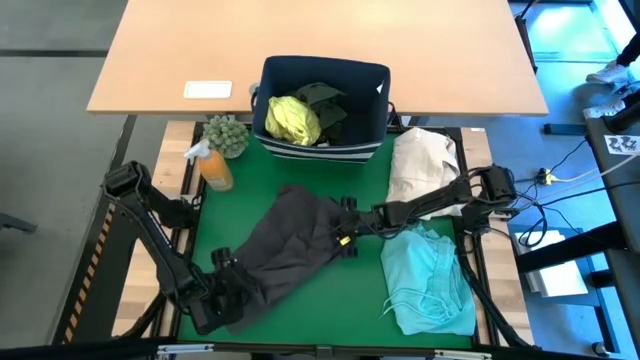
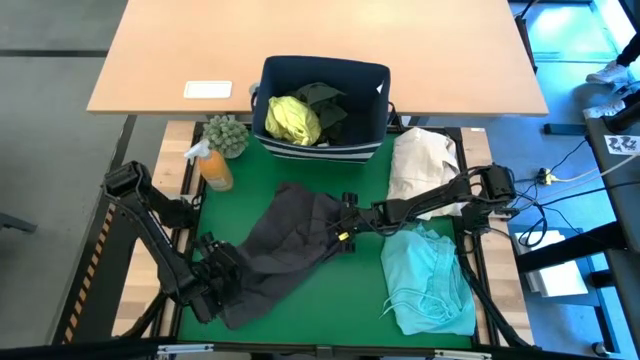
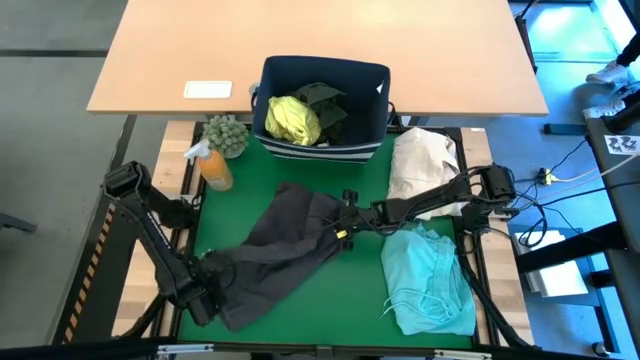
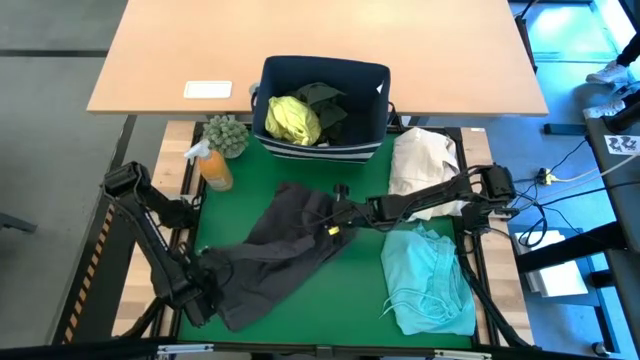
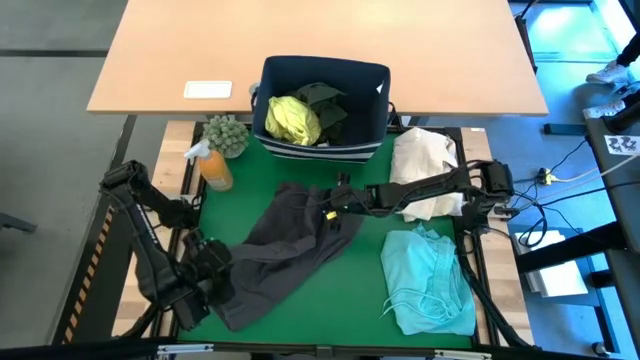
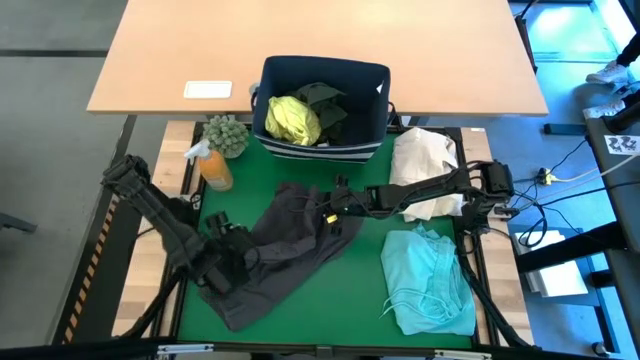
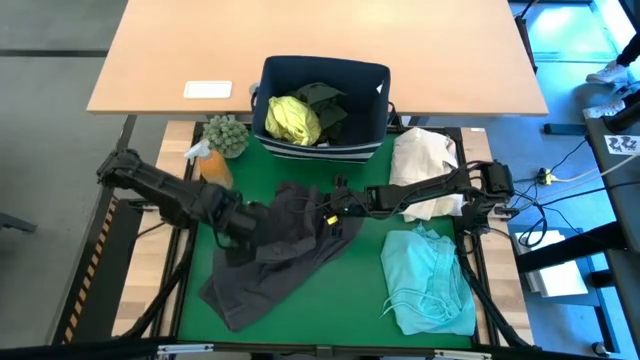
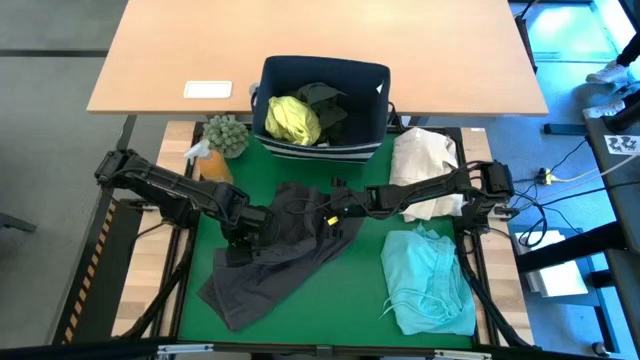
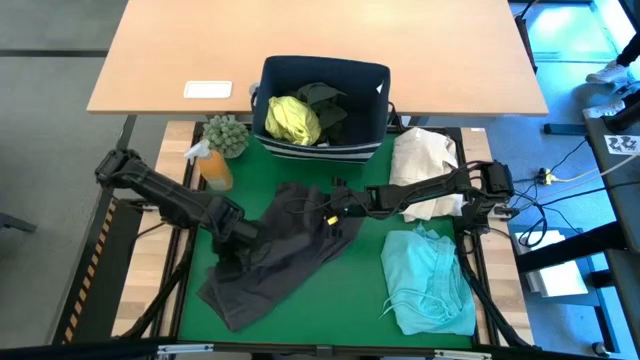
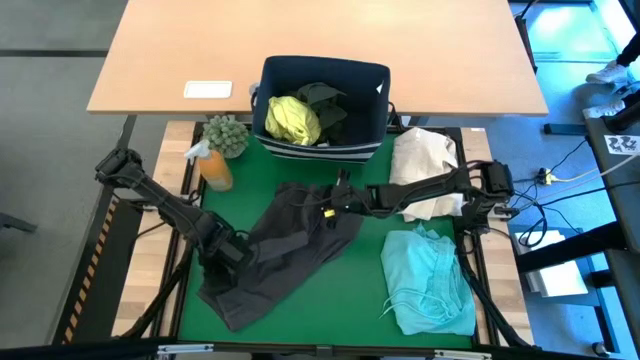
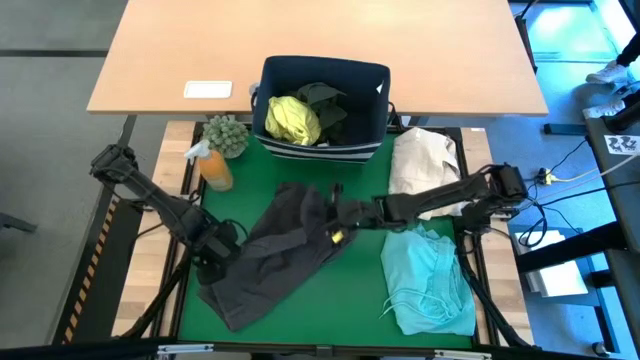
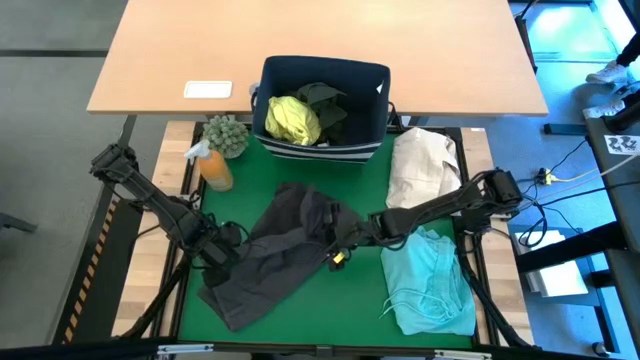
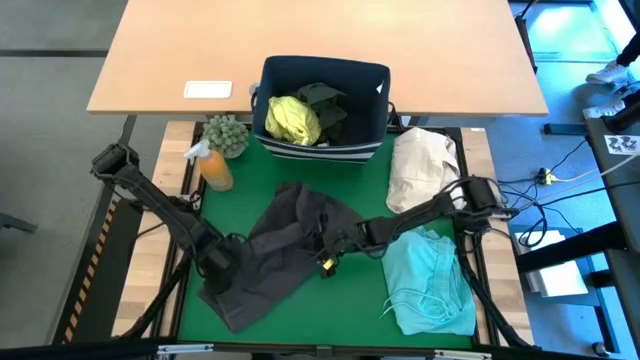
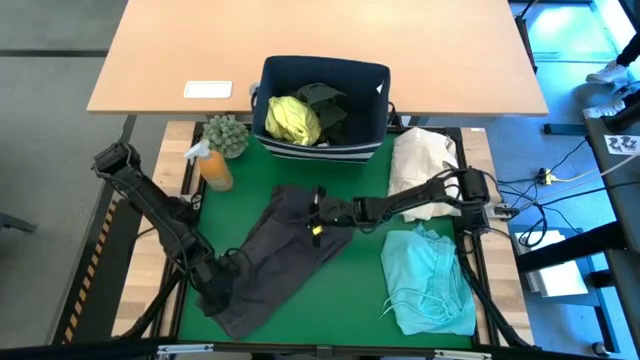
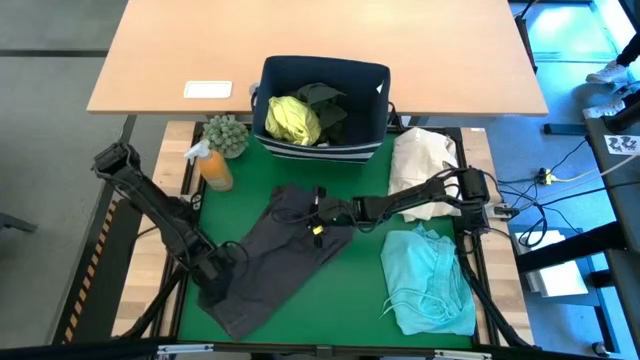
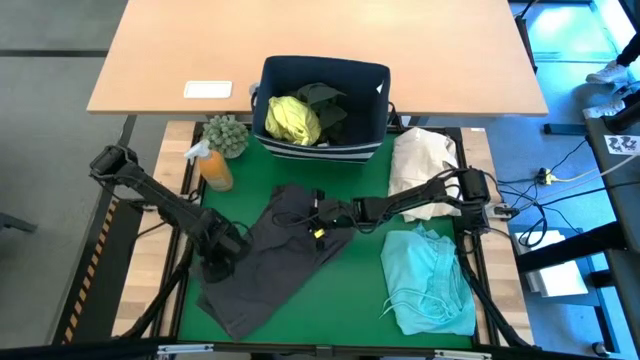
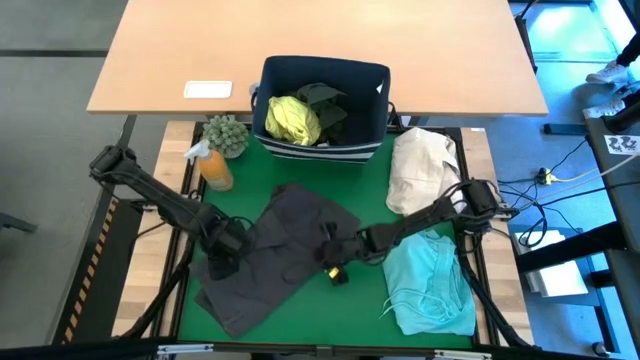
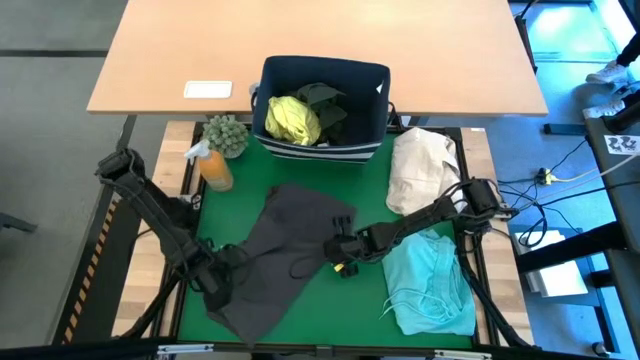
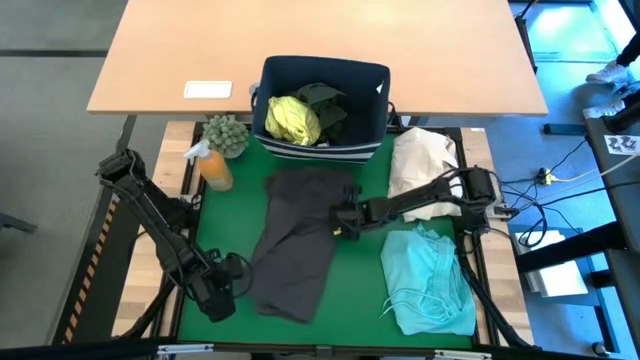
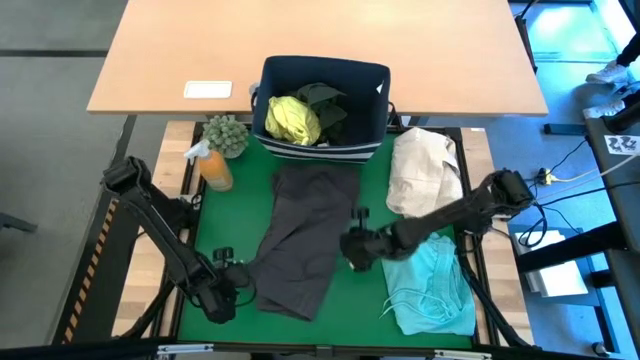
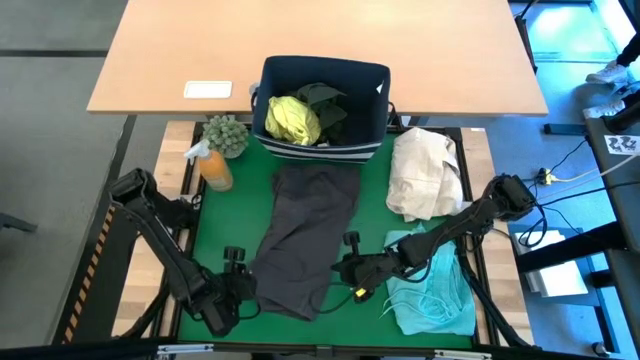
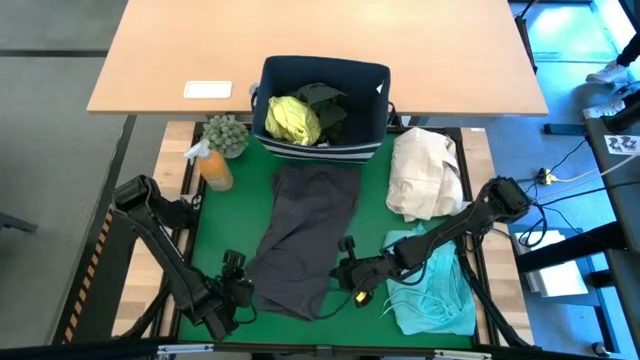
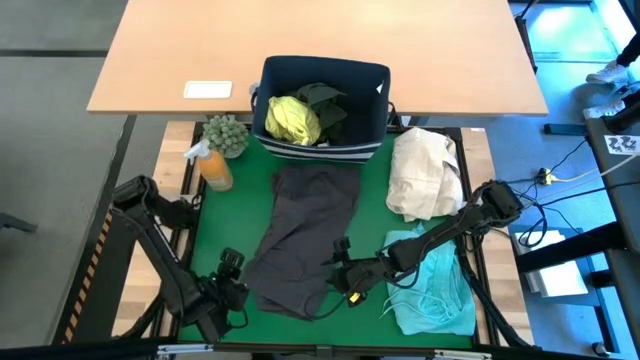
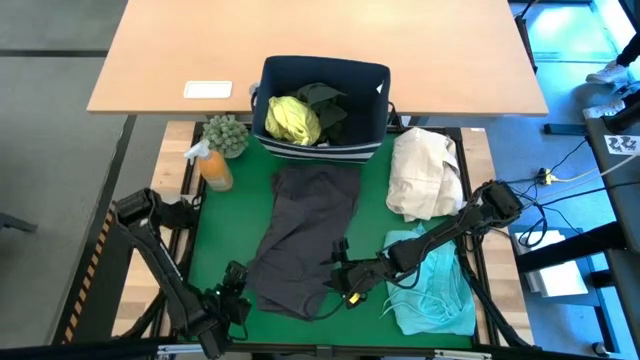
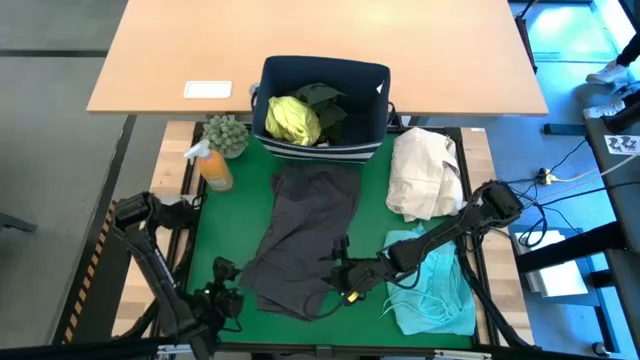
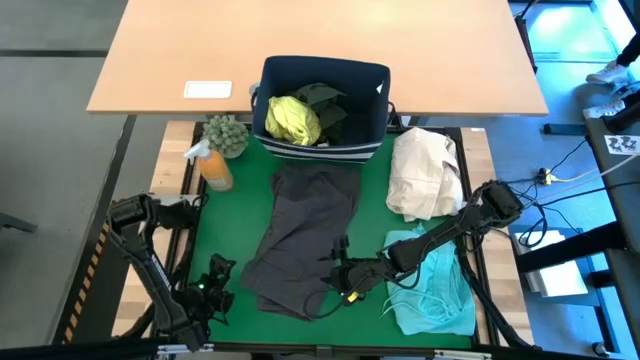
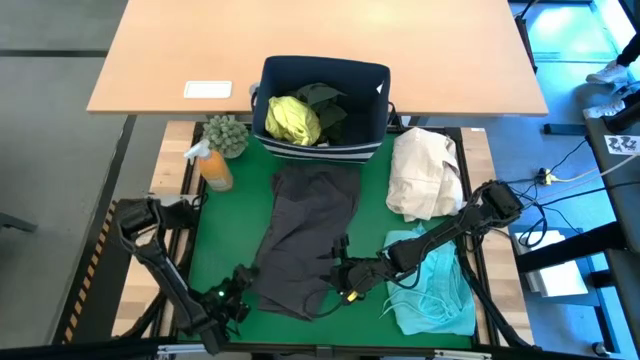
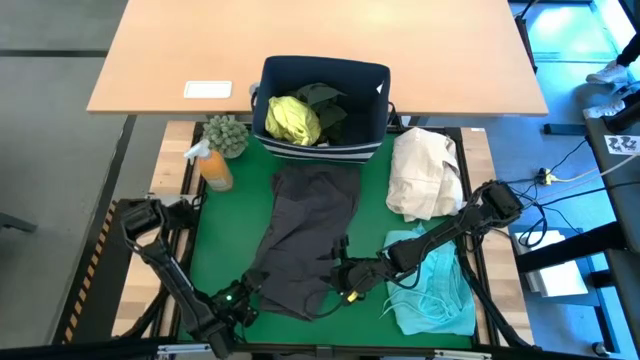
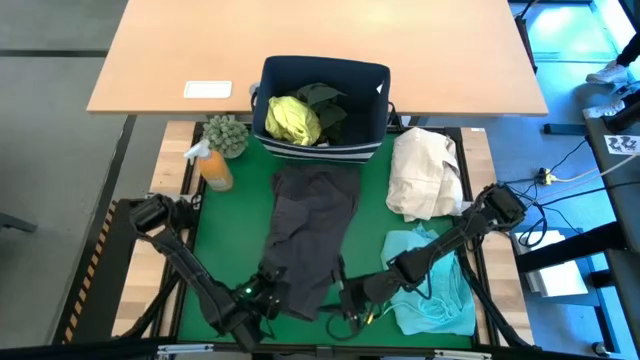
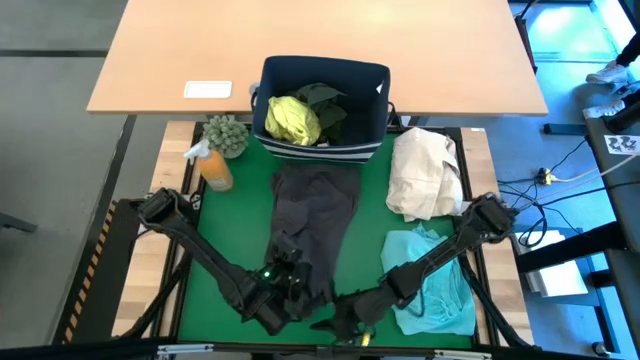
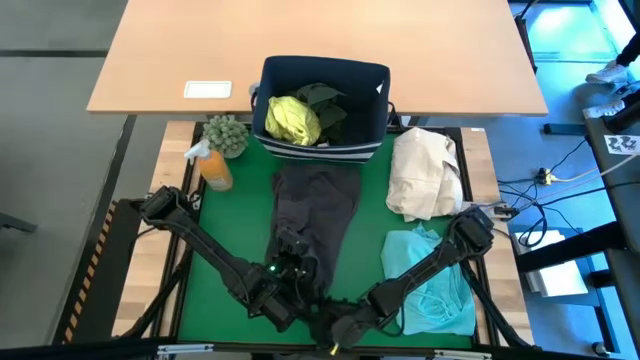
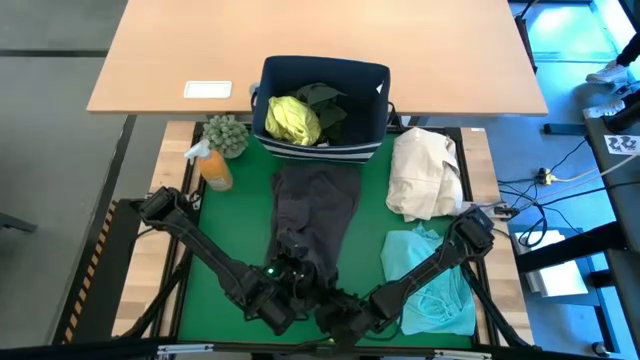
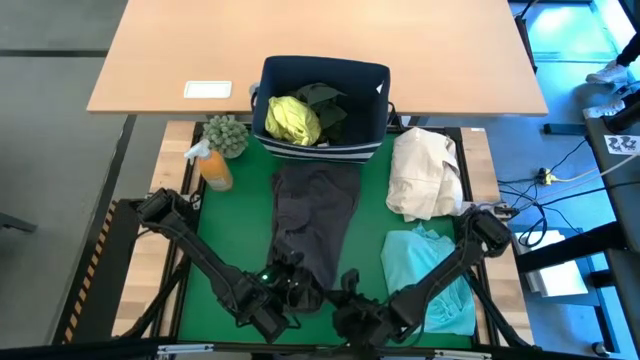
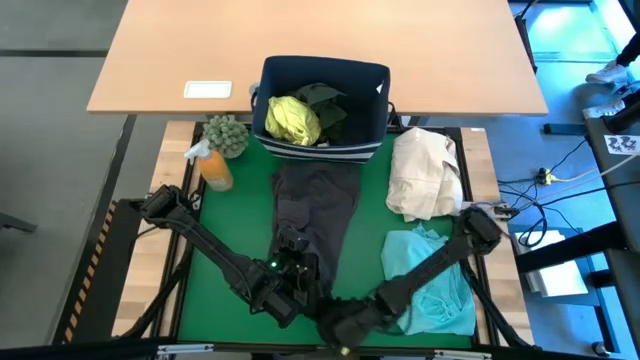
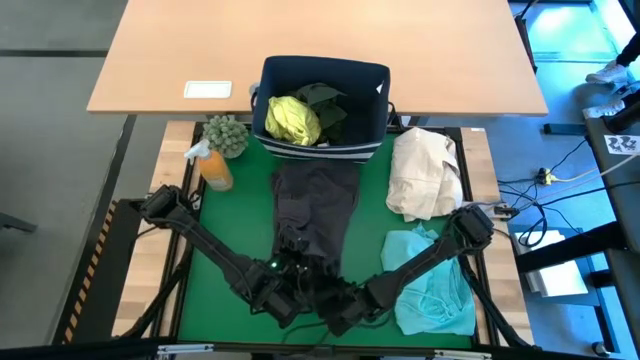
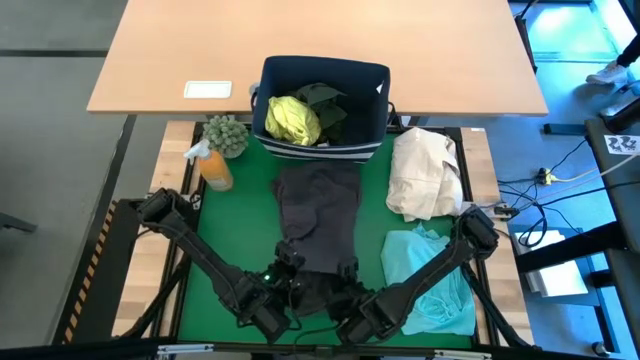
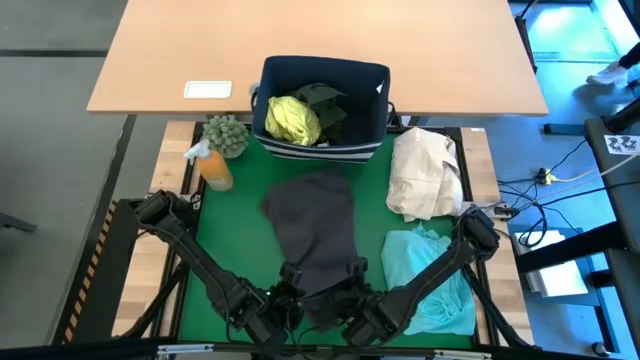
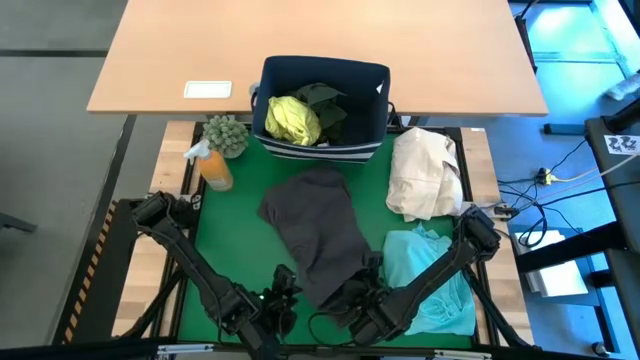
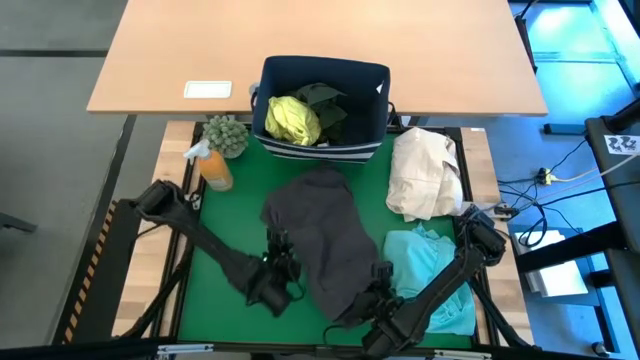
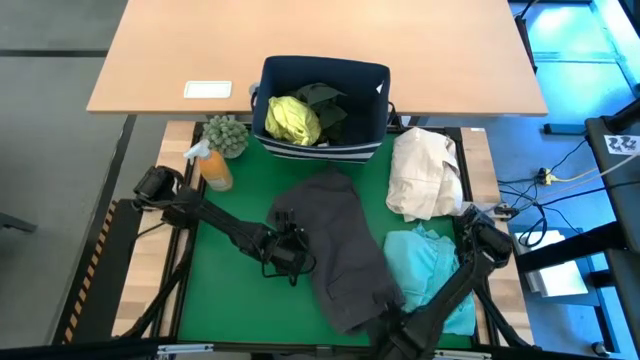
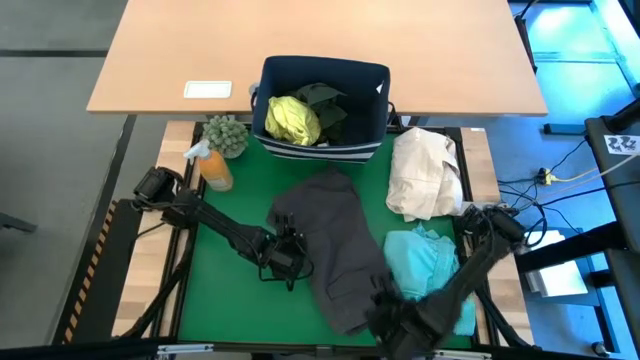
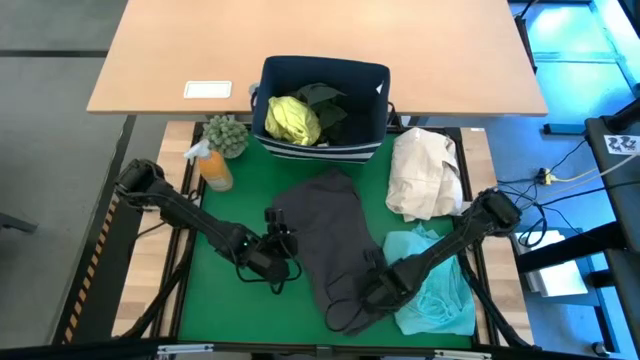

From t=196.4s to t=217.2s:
Task: Fold laundry
Fold the black shorts
